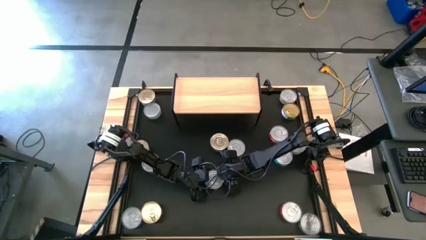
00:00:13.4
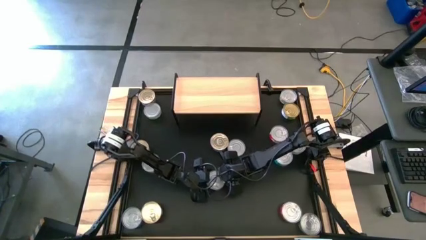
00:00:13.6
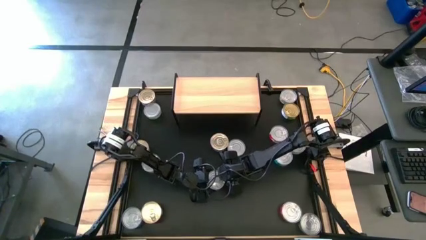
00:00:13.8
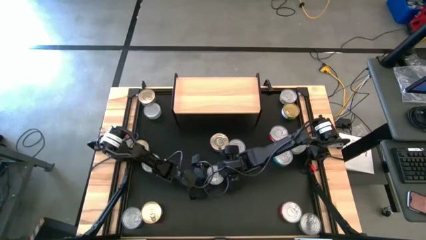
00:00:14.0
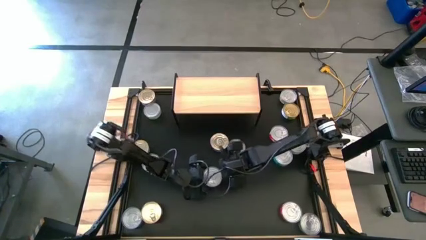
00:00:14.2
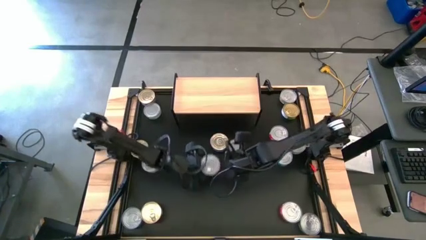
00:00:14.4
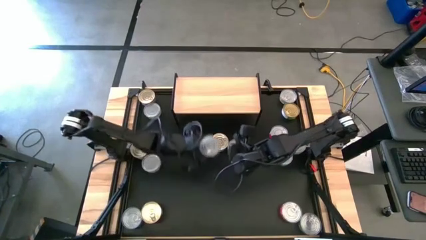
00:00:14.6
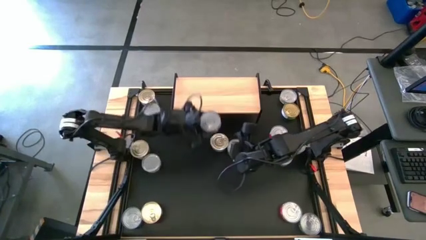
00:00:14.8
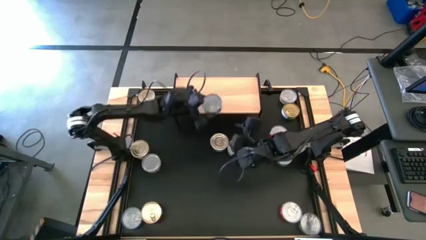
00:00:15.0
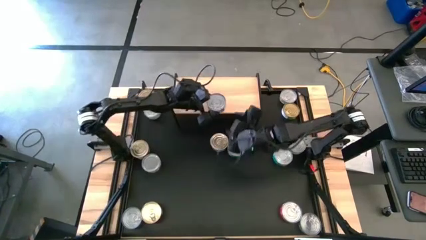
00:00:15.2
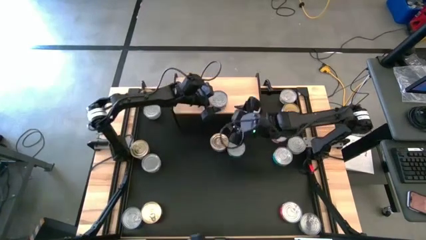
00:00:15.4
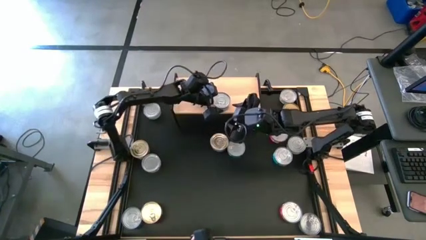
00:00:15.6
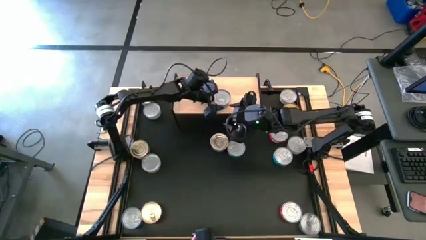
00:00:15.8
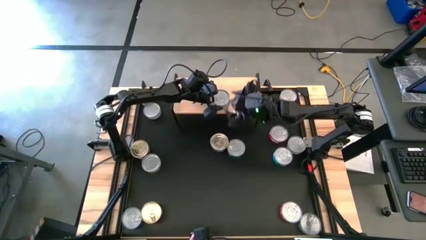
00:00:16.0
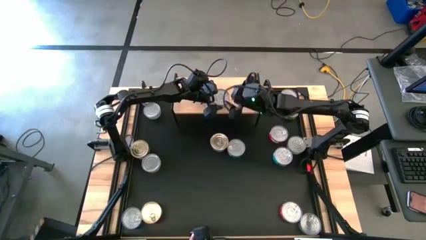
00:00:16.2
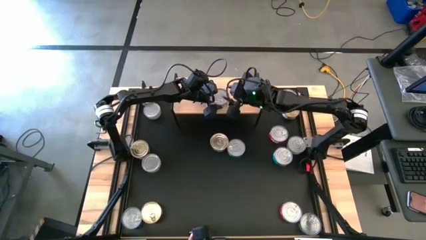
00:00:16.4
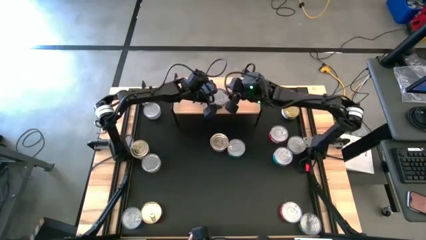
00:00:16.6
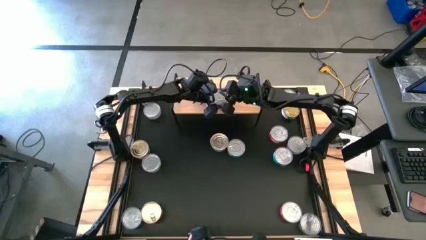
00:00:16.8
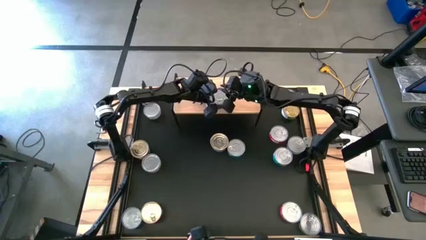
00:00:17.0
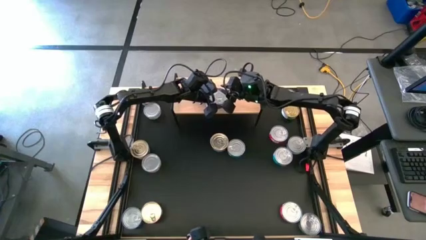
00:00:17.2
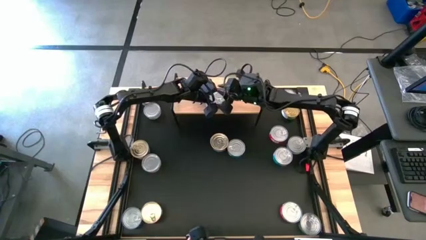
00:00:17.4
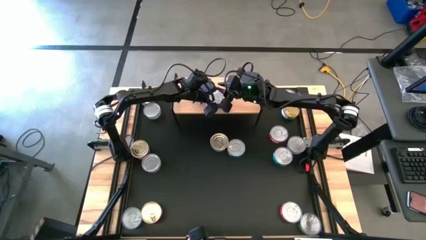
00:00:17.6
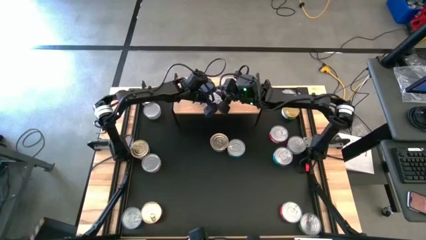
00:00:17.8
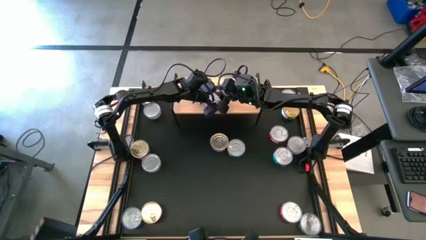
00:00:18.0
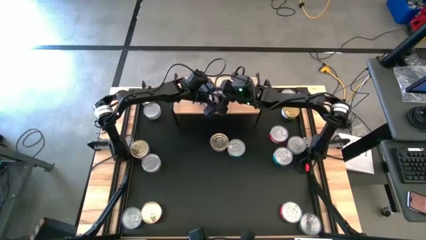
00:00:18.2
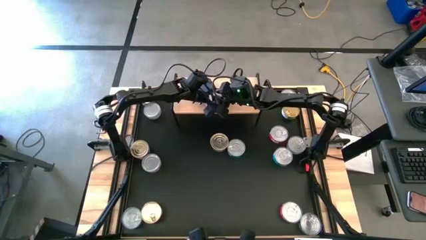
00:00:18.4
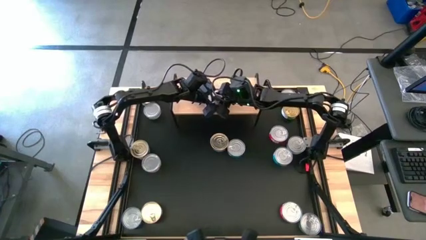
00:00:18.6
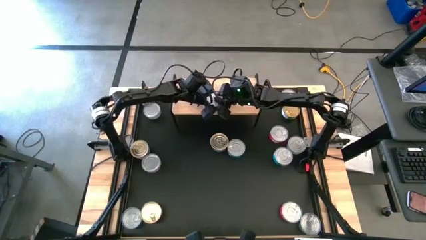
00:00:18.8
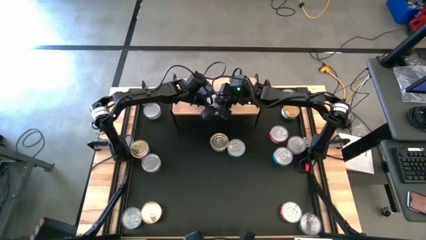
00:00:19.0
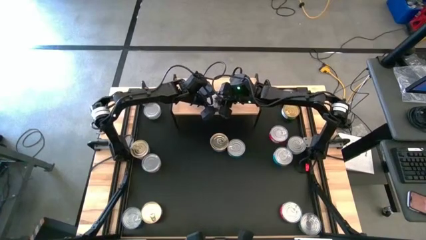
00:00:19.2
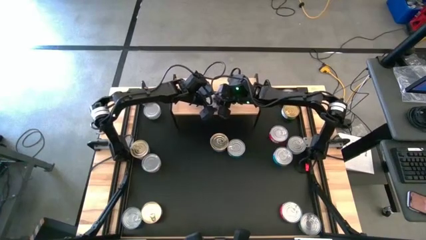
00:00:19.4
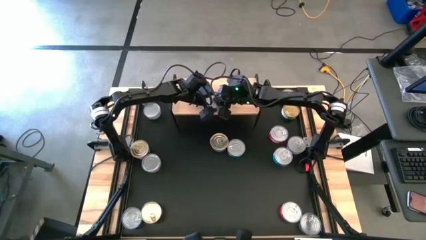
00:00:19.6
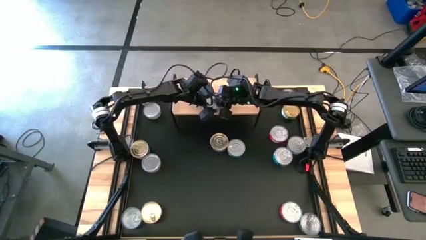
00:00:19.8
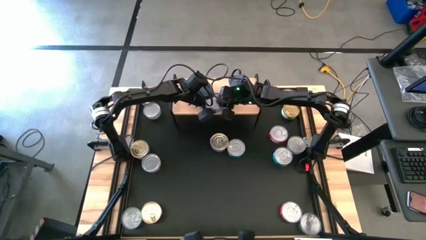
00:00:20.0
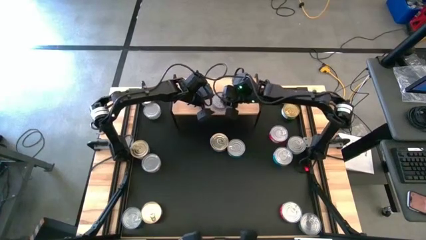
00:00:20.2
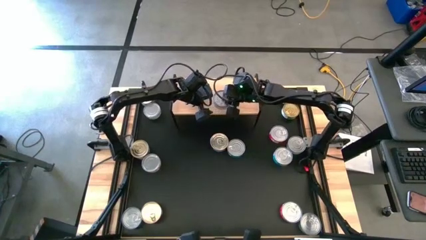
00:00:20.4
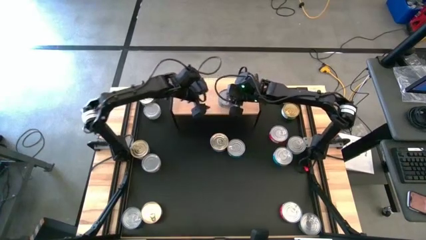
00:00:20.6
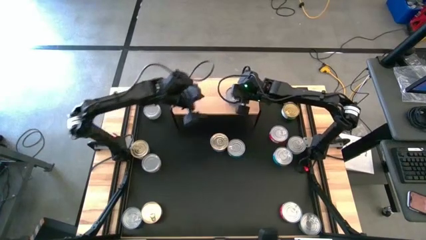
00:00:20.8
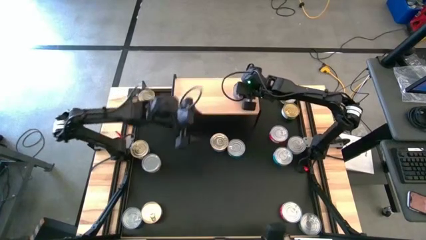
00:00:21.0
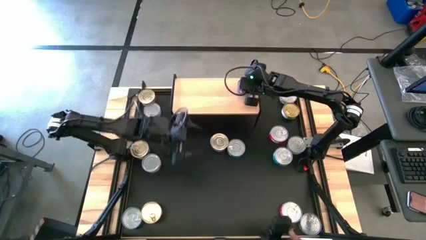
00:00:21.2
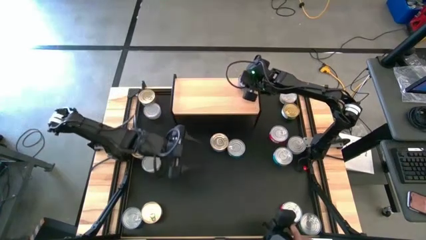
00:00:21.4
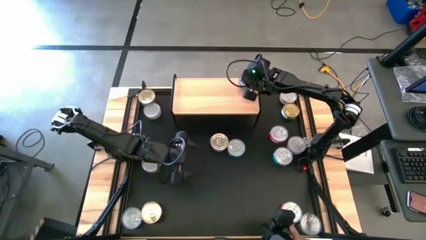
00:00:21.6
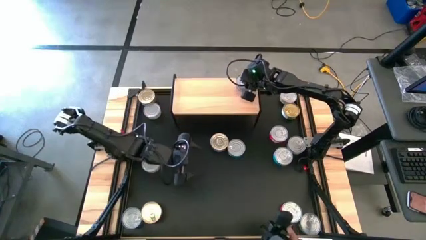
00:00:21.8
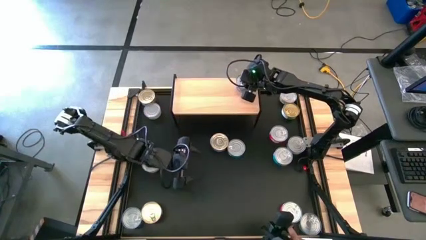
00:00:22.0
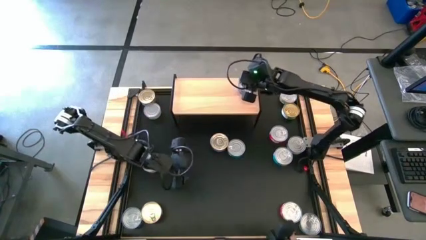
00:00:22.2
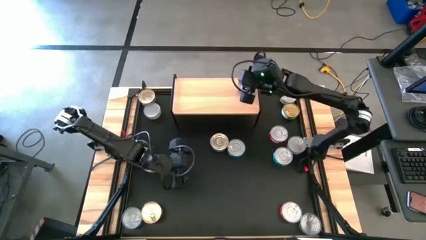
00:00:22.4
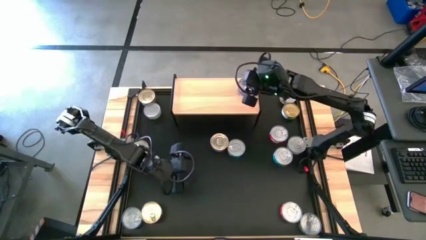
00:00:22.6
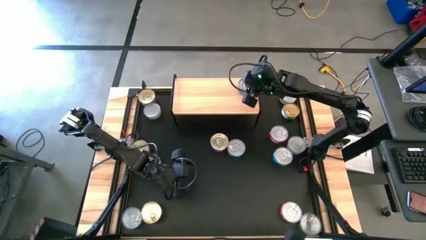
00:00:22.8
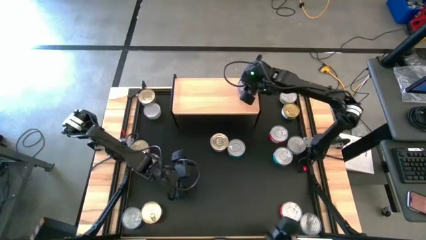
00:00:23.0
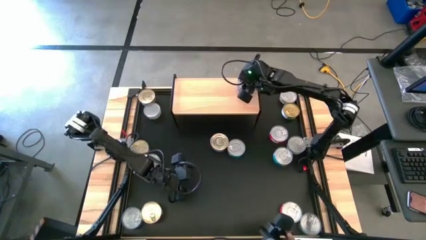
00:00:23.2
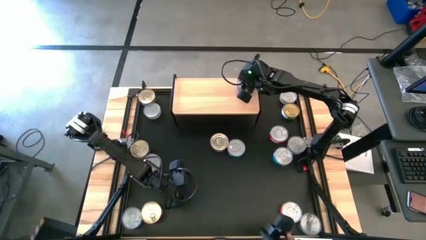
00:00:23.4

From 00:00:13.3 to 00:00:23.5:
Task: Stack canned seafood by type on shelf
Put the blue tuna can on the shelf
